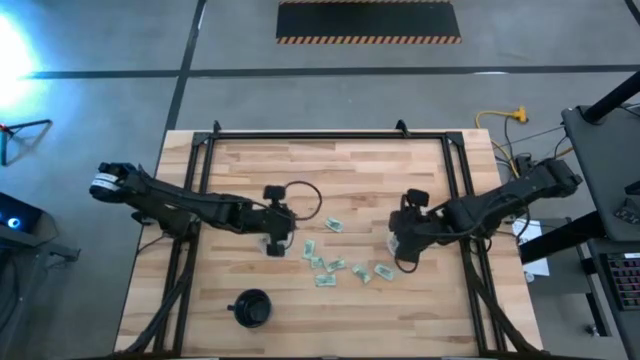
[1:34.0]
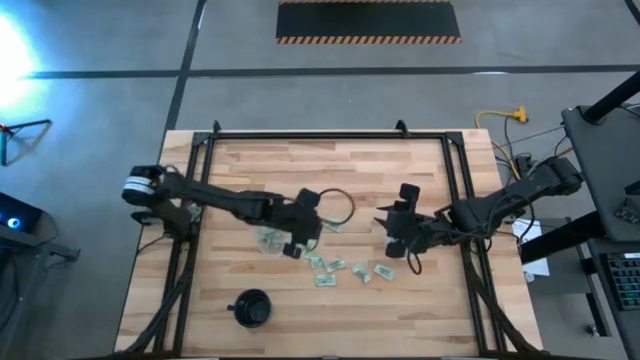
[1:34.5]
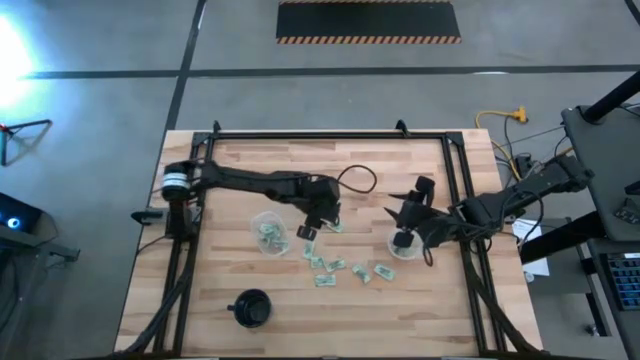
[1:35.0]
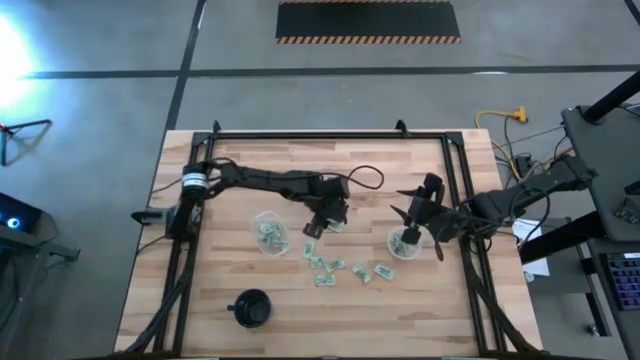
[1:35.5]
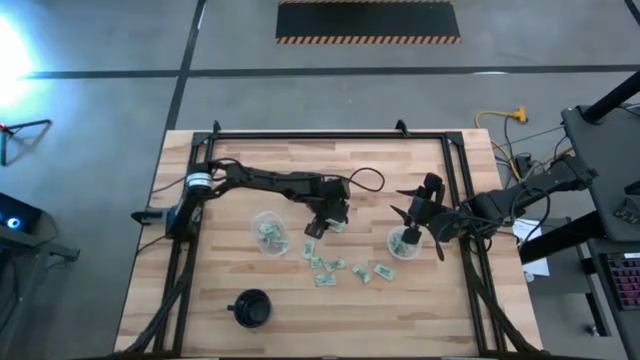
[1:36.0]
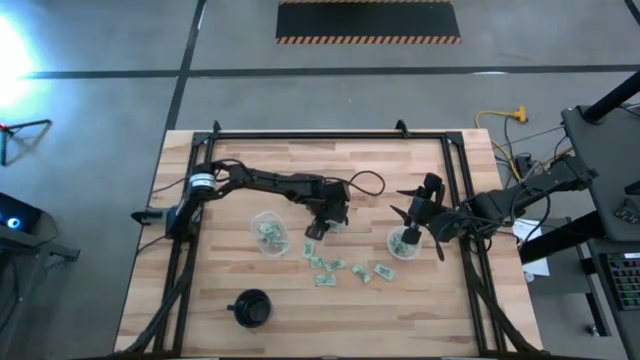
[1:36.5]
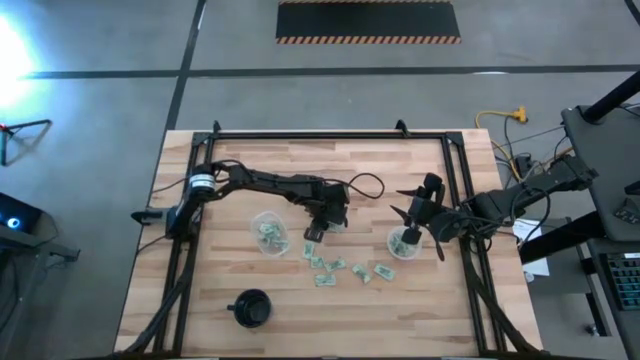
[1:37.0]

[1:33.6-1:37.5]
Task: Pick and place Stevia / Truvia into bins
Put the stevia packet into the oval transparent container

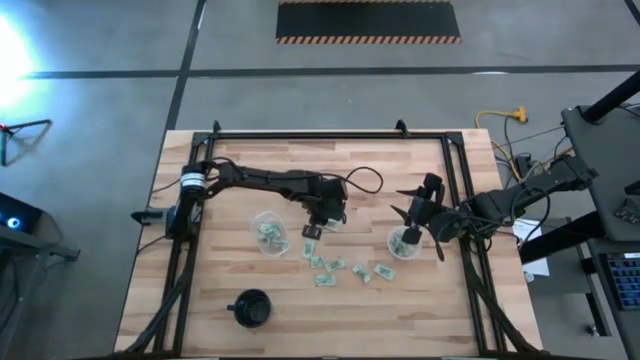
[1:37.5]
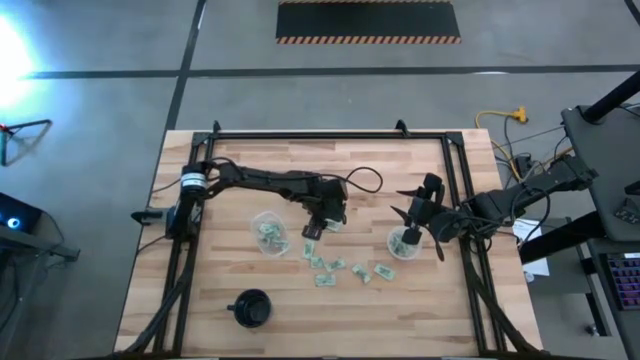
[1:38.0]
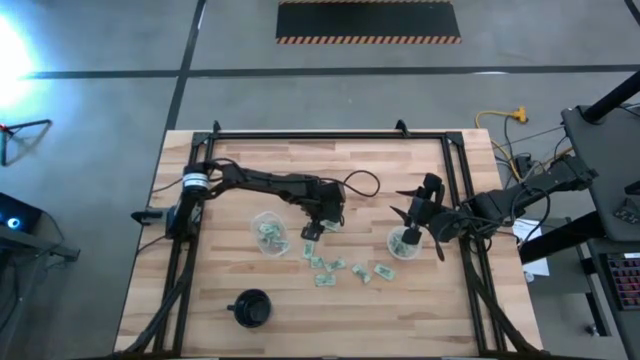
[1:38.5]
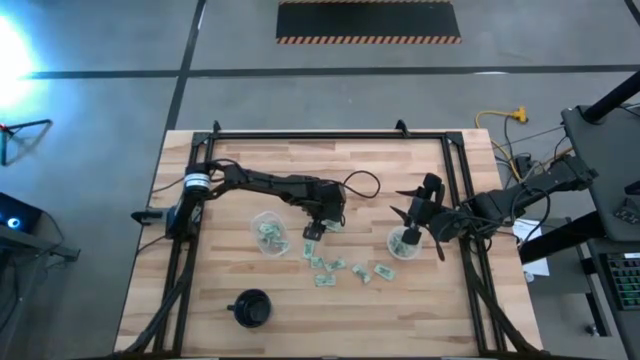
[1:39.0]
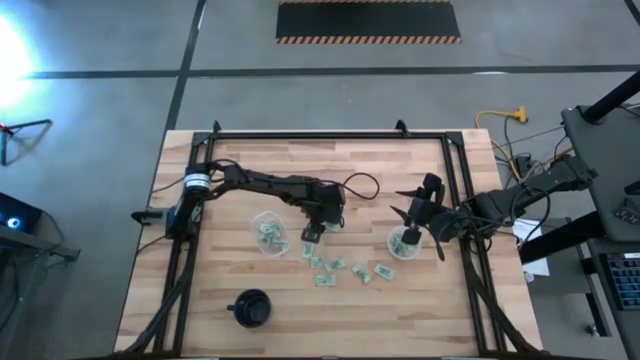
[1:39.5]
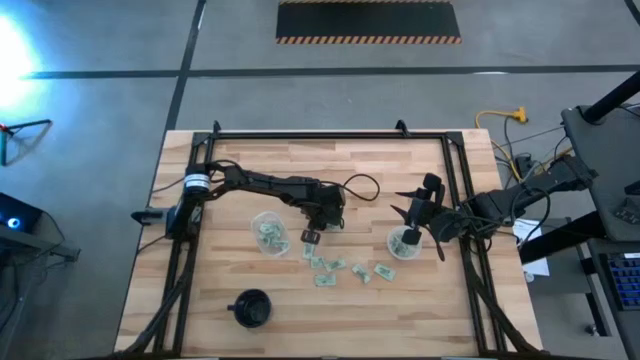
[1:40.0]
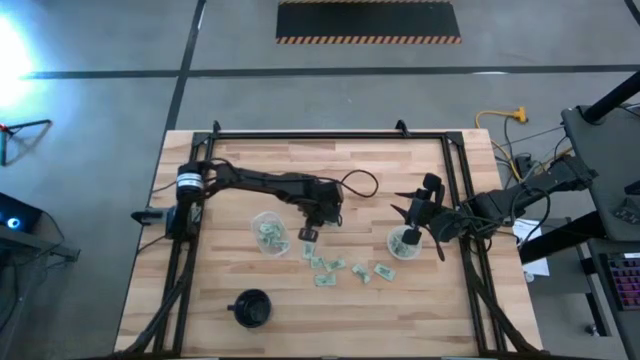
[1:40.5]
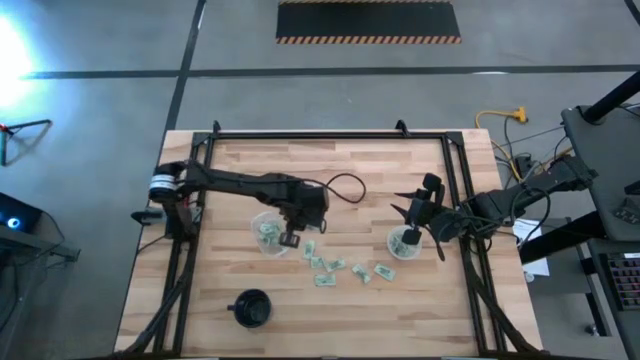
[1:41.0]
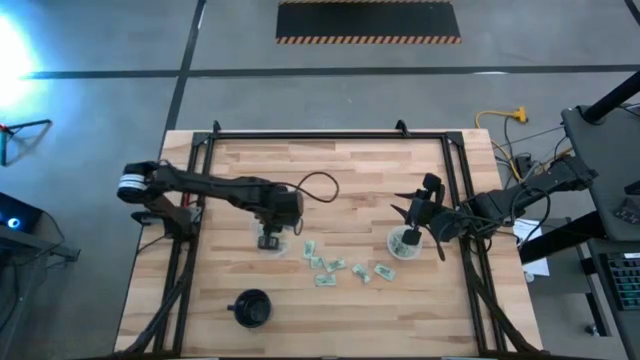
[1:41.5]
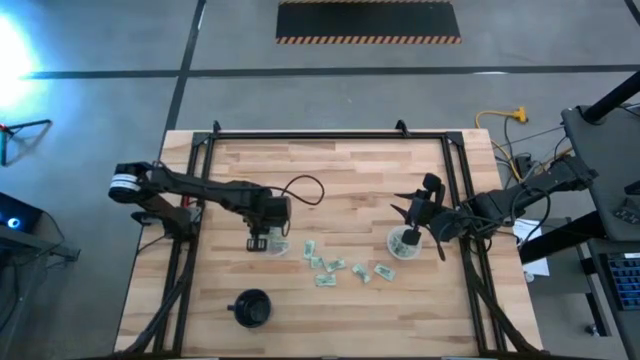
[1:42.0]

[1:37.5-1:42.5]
Put the stevia packet into the oval transparent container

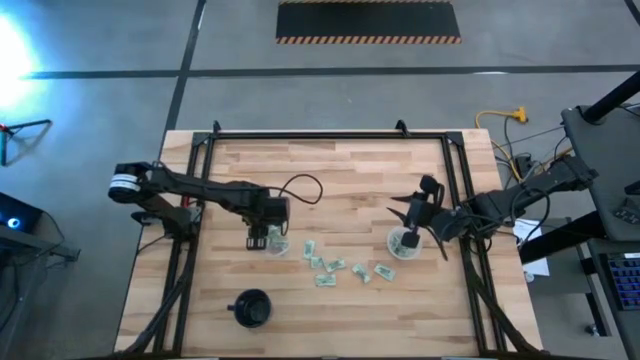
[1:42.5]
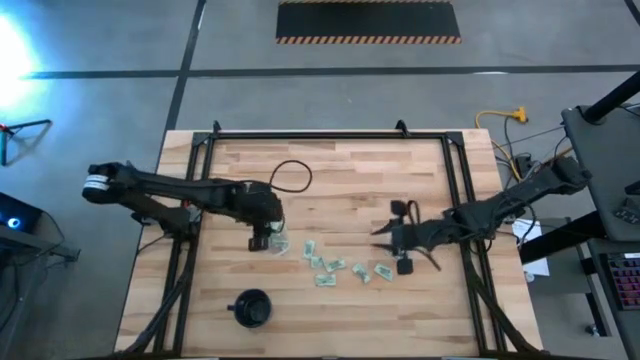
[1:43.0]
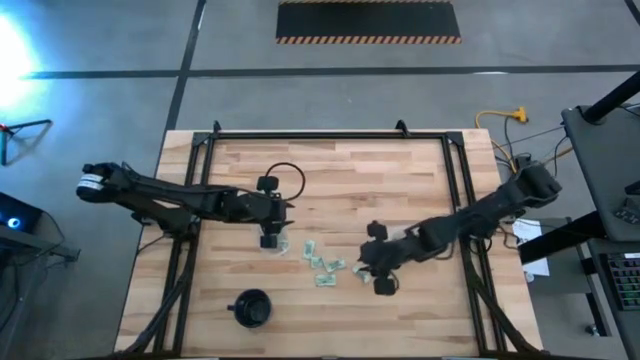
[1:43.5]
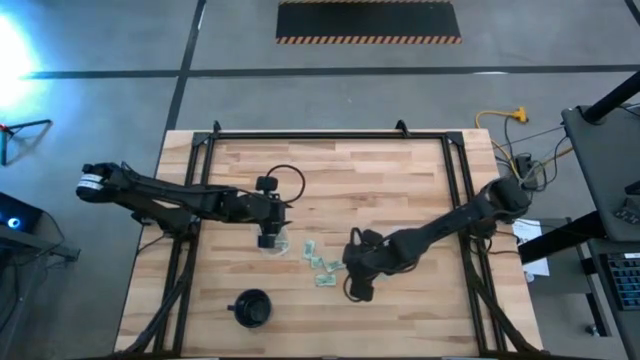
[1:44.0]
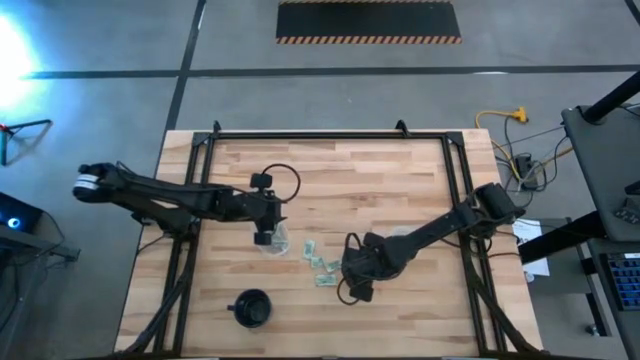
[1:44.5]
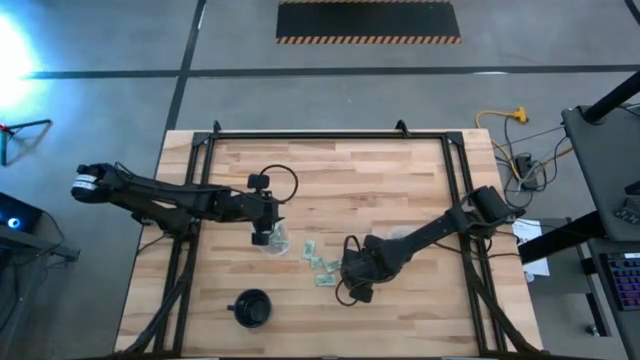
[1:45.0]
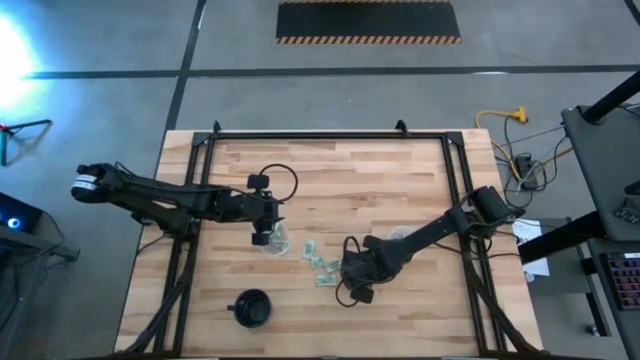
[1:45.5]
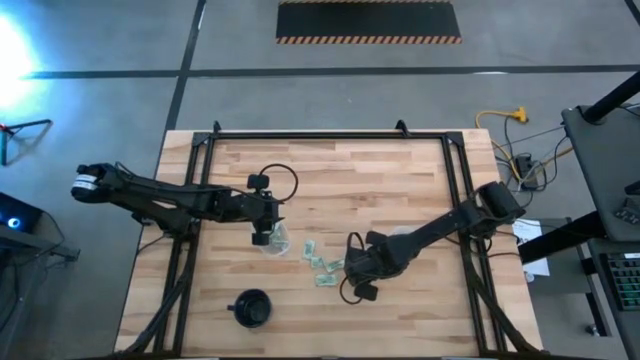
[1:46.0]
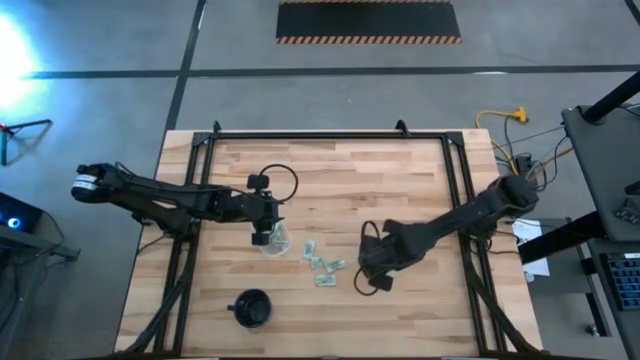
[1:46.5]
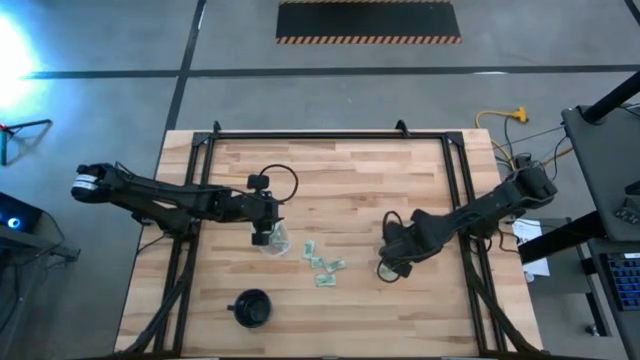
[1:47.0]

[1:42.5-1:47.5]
Put the stevia packet into the round transparent container

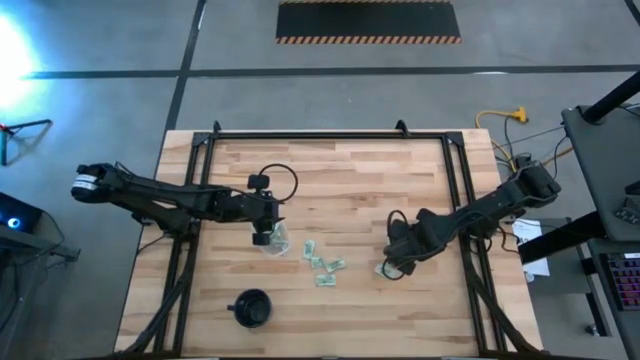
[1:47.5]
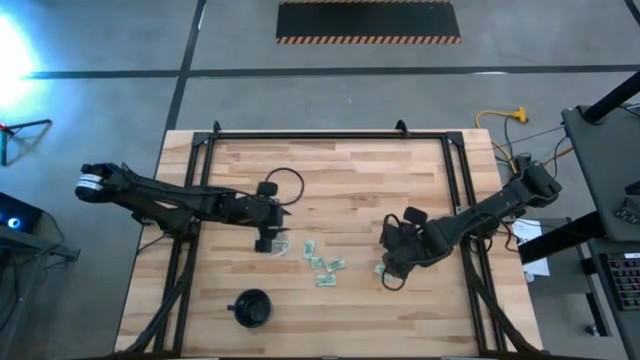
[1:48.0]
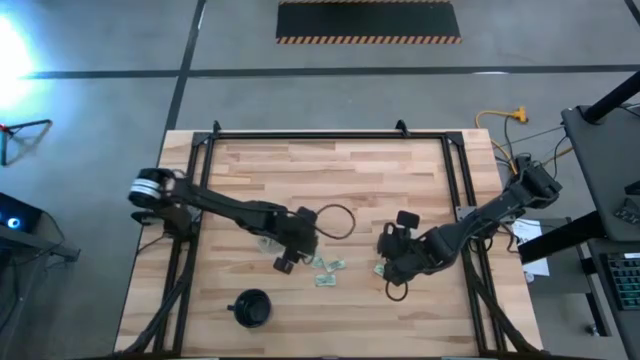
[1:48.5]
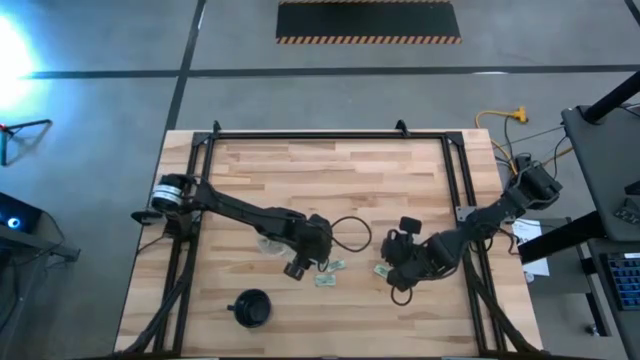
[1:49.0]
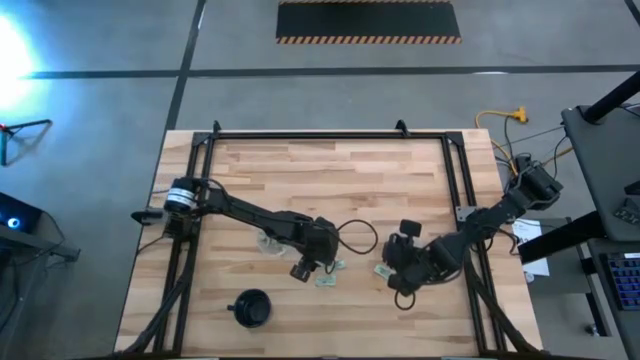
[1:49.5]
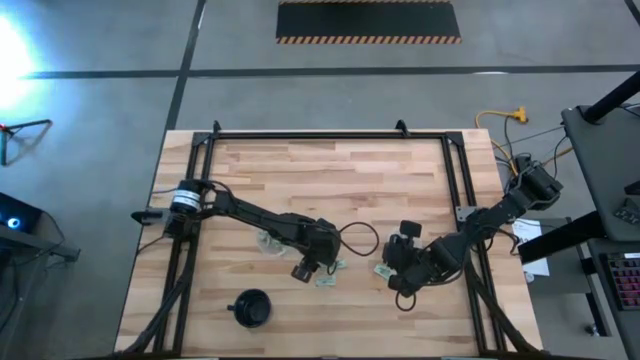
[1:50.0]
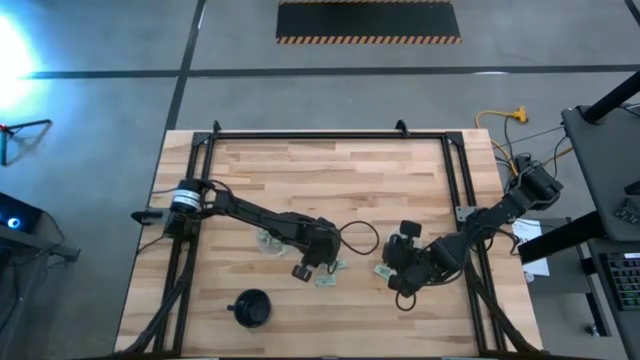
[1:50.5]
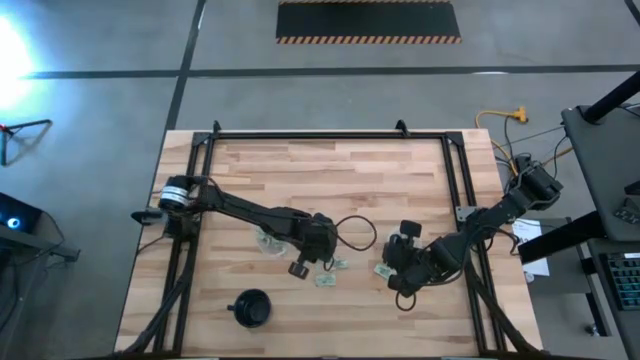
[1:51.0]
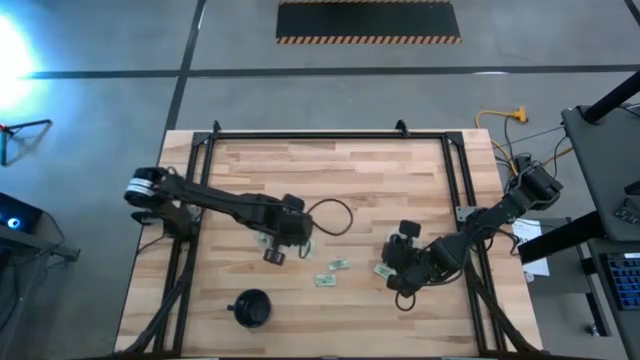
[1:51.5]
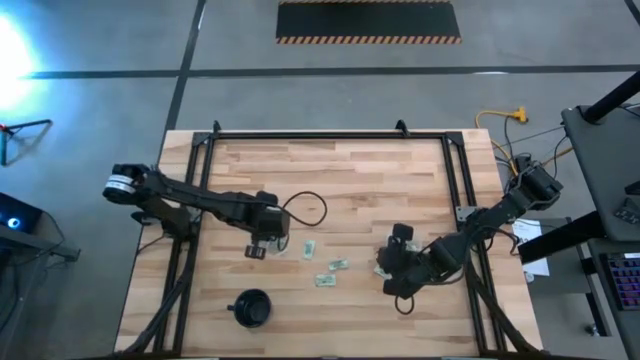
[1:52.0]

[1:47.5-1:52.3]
Put the stevia packet into the oval transparent container
